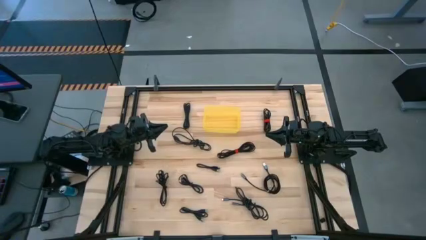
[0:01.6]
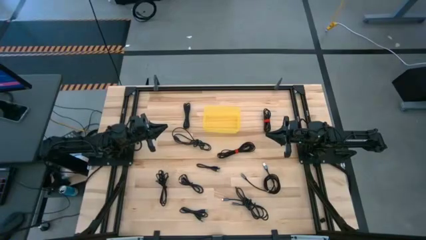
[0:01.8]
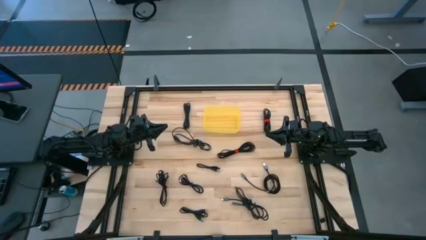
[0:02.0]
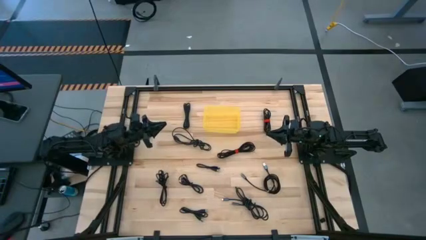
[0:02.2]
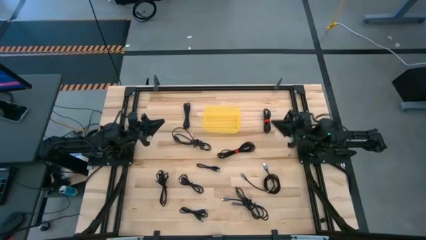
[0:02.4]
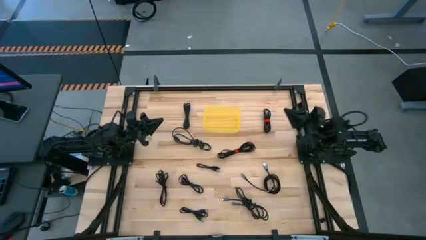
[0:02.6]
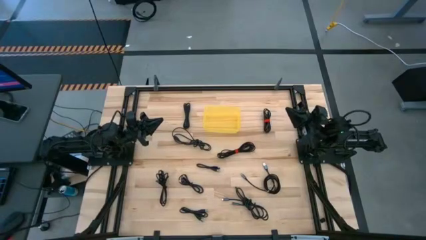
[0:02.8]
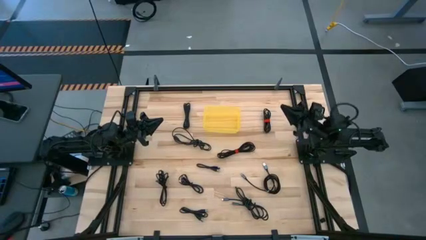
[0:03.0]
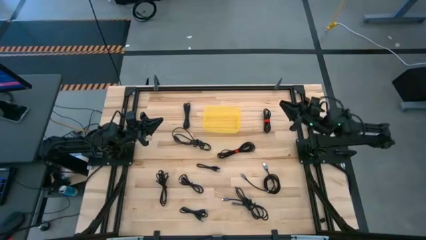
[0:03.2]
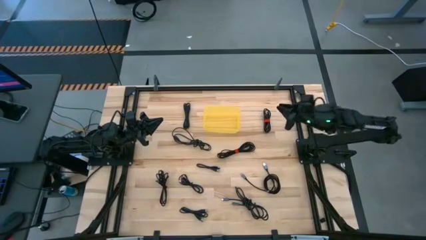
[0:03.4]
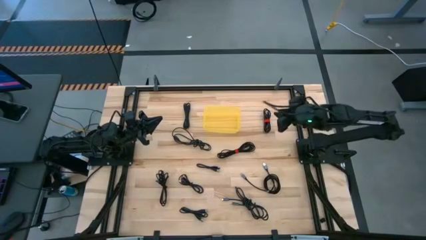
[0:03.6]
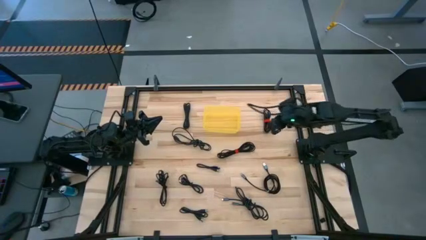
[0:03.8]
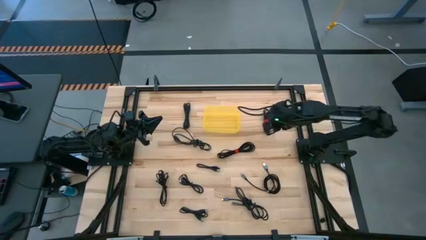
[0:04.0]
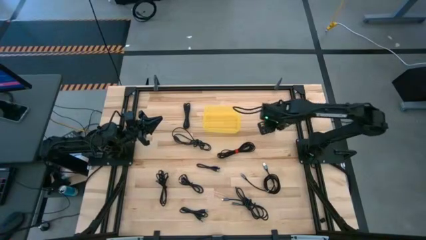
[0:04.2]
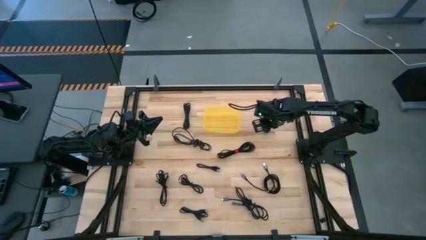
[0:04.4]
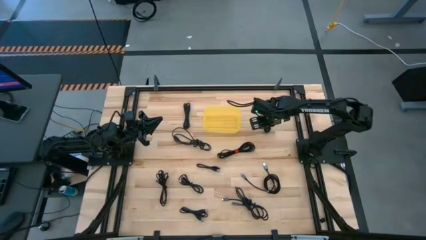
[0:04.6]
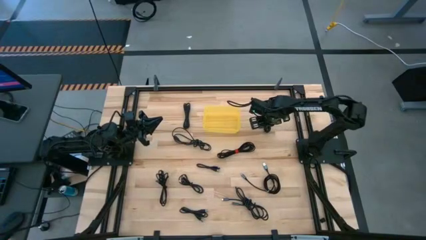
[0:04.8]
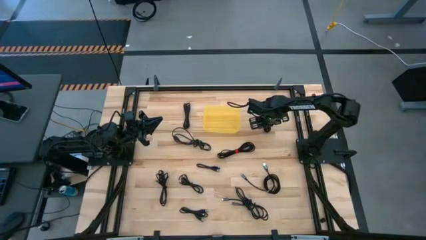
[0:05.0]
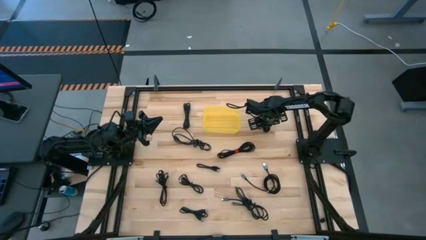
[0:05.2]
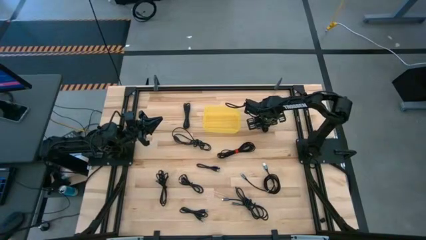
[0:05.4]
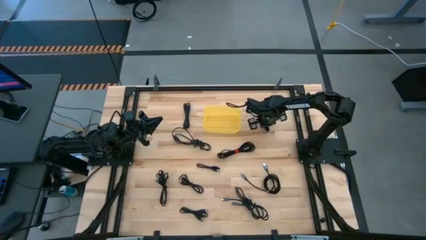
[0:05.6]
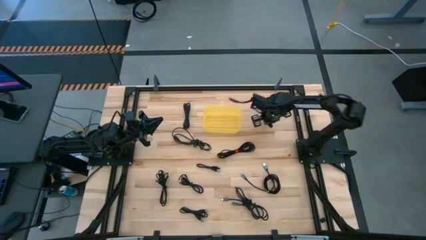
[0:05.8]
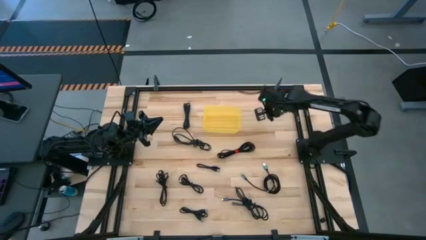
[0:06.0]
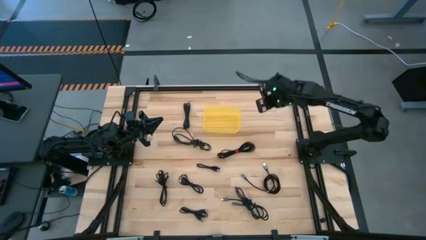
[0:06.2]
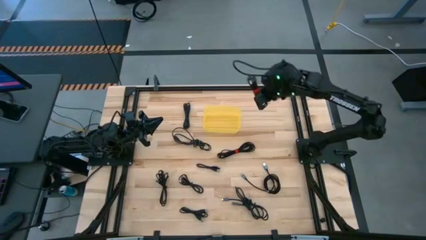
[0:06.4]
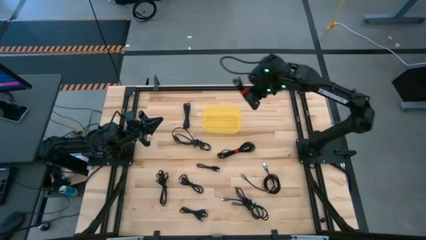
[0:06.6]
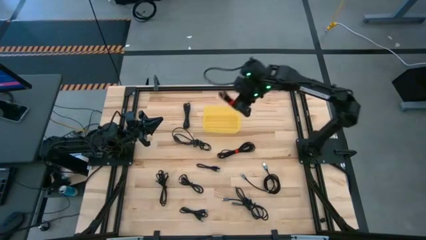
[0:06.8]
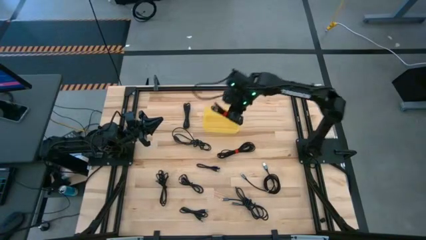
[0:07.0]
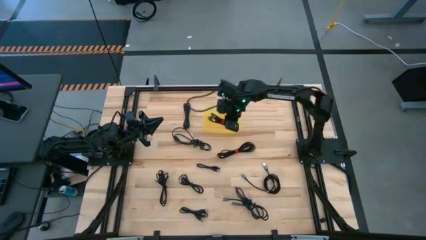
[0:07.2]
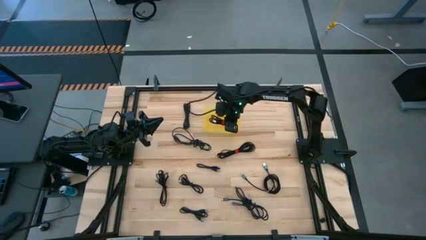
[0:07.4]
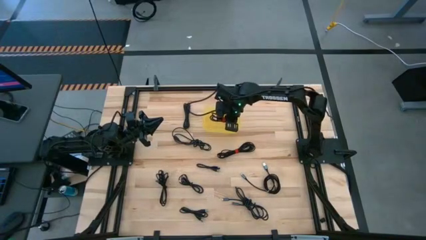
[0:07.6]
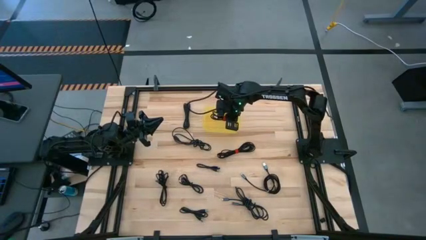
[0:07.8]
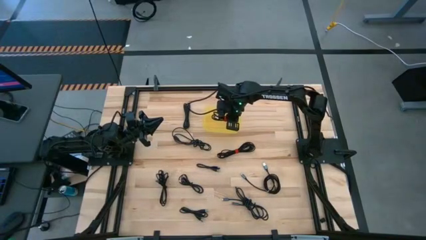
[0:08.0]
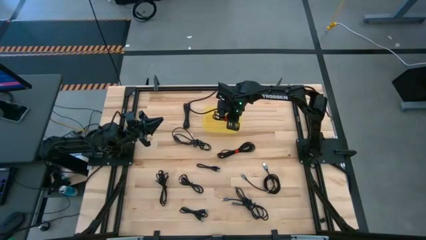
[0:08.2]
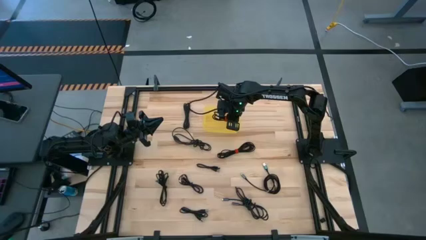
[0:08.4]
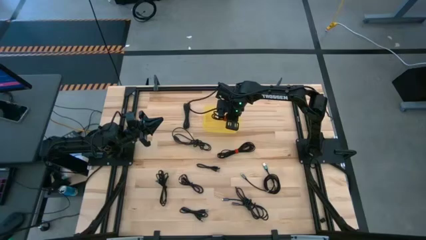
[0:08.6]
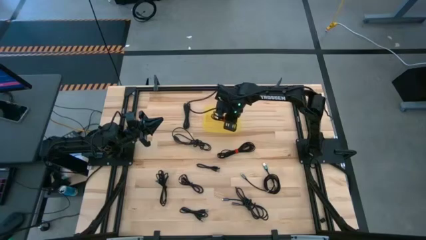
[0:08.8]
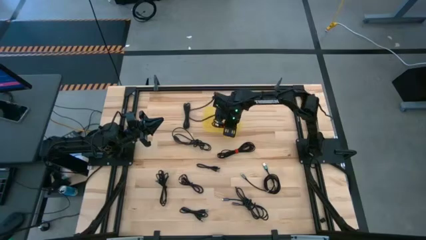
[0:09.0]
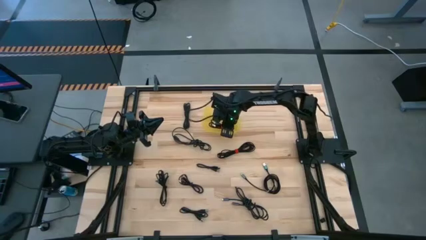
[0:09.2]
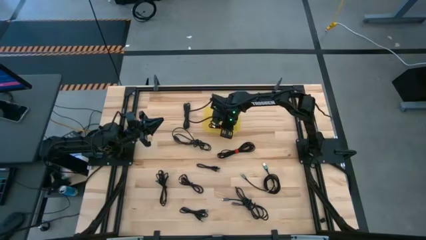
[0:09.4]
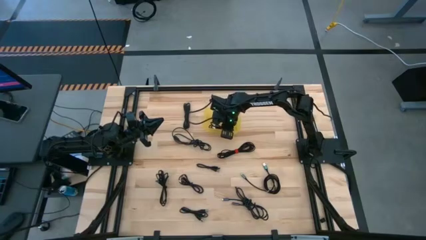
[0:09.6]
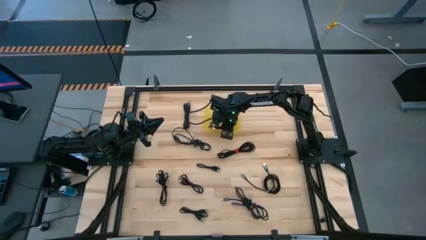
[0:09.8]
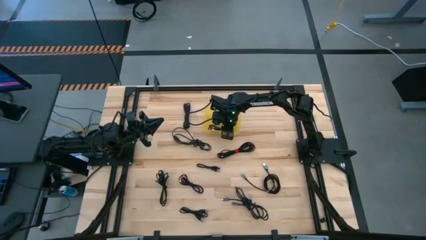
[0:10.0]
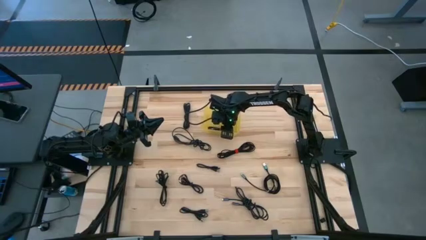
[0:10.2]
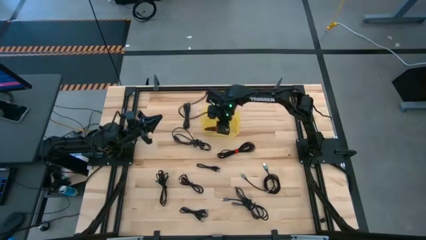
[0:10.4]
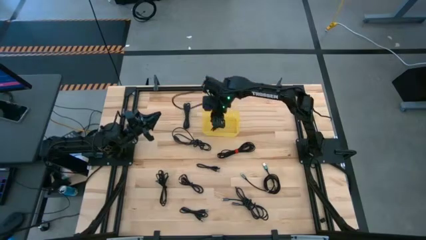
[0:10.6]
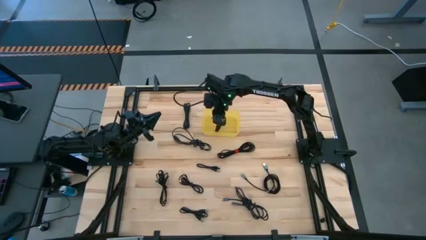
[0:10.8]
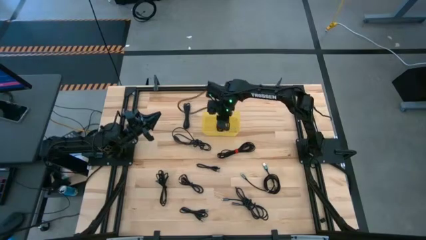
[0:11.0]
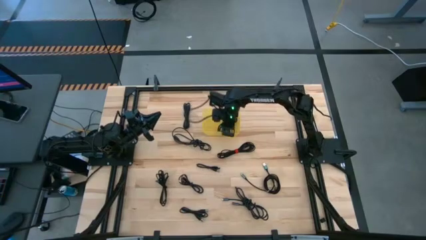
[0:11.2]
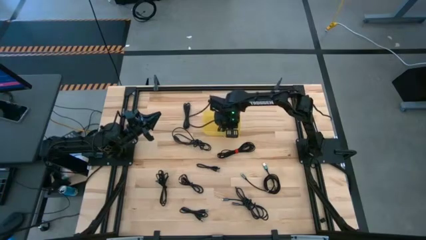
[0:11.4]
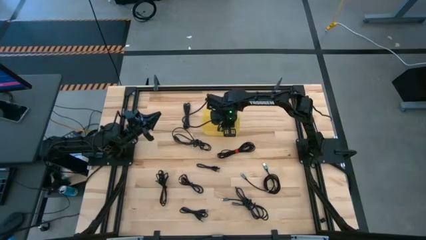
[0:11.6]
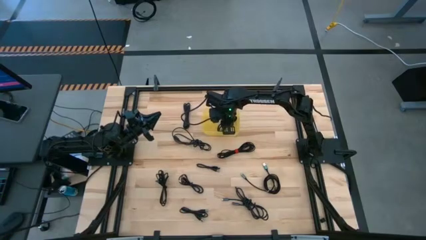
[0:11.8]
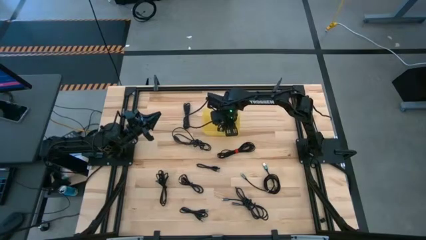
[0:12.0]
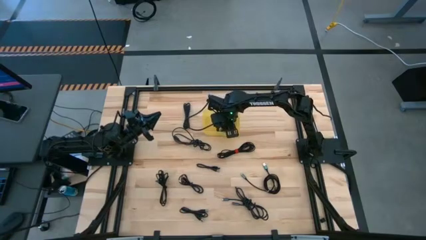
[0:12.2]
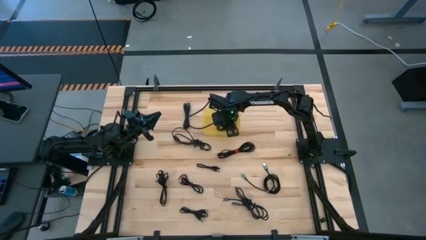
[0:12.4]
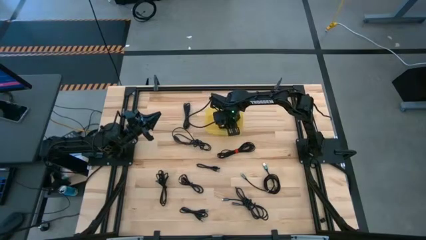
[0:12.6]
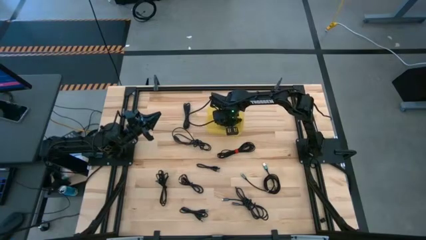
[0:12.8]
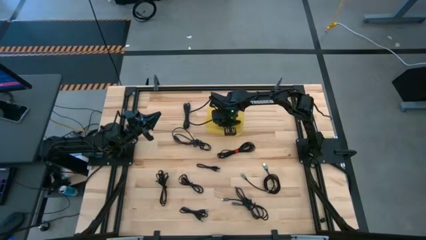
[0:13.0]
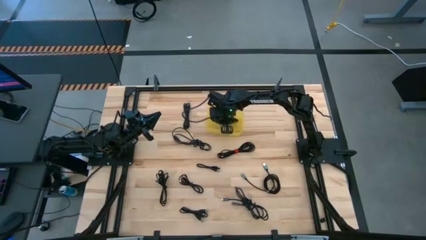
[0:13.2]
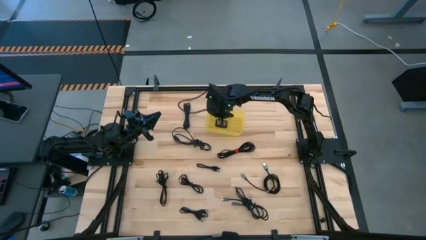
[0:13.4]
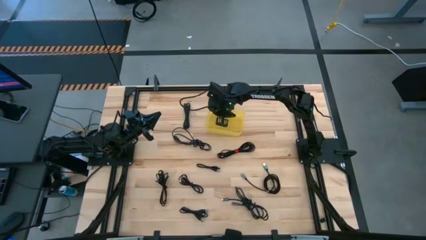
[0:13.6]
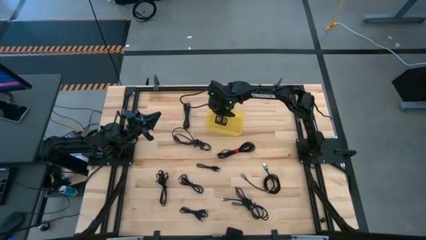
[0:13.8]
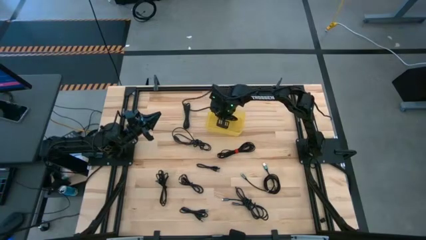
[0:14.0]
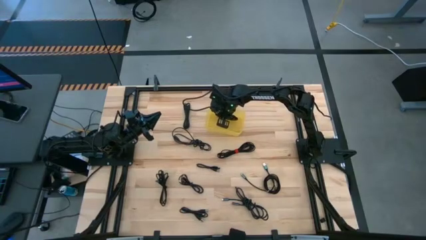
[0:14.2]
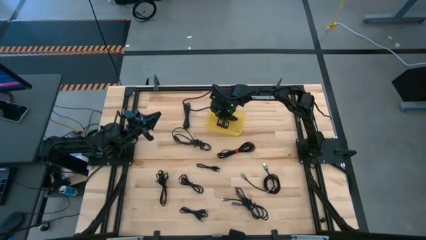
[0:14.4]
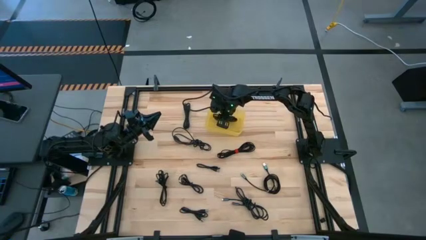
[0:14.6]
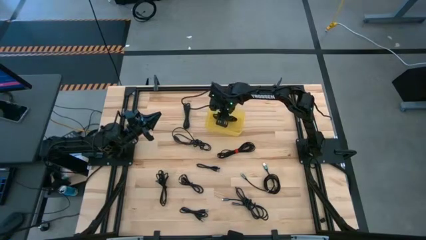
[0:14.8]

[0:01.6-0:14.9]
Task: Pick and place USB-C Cables
Put the black charger cable into the yellow bin
